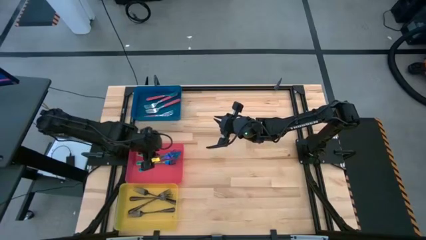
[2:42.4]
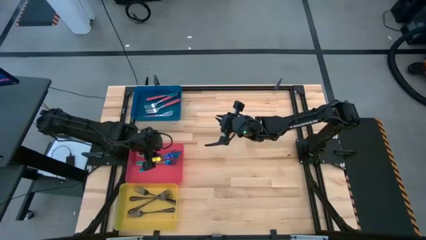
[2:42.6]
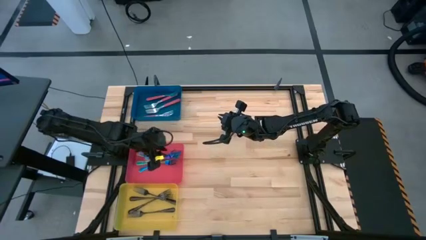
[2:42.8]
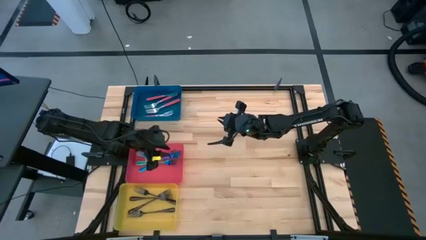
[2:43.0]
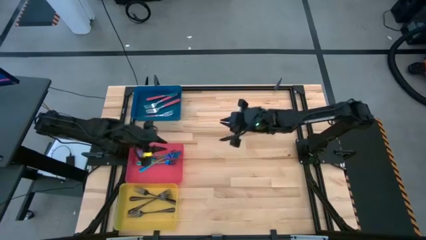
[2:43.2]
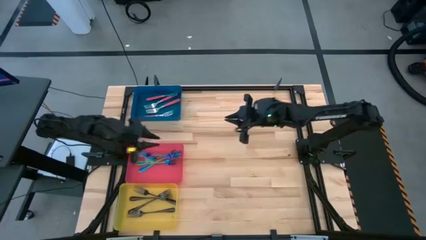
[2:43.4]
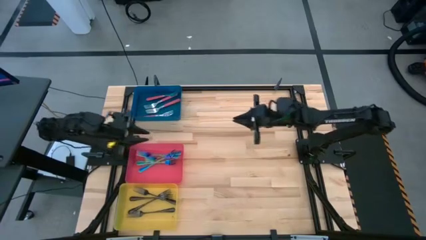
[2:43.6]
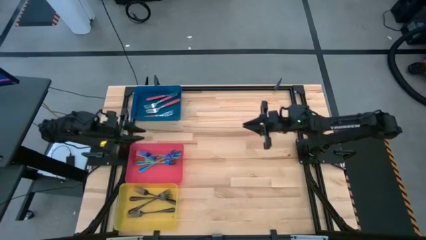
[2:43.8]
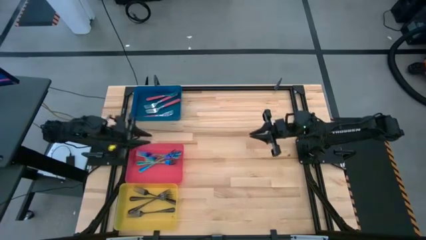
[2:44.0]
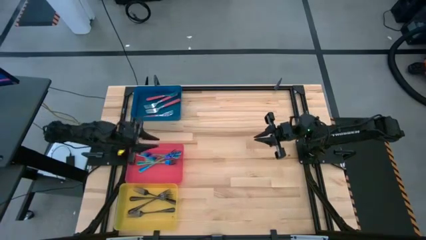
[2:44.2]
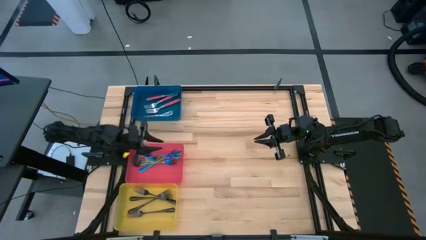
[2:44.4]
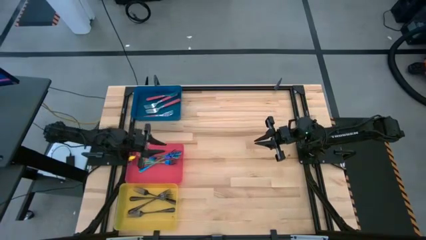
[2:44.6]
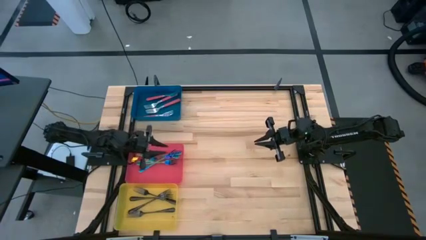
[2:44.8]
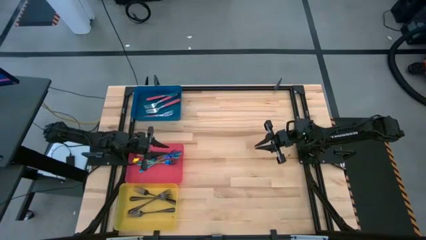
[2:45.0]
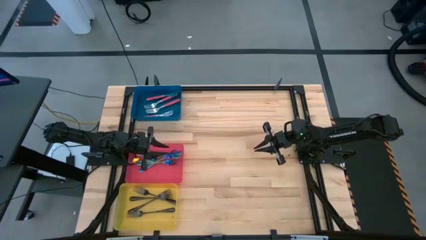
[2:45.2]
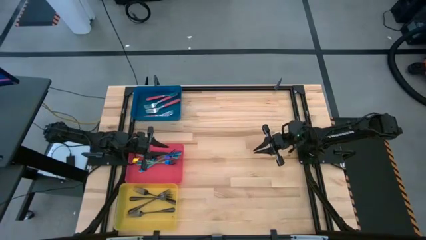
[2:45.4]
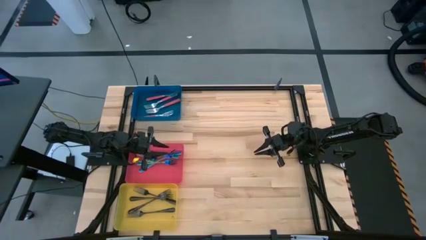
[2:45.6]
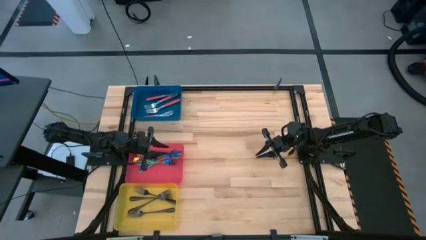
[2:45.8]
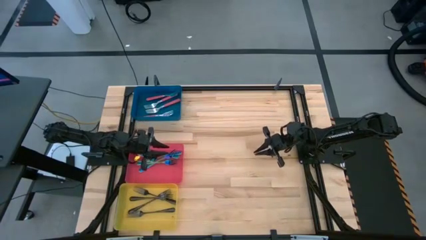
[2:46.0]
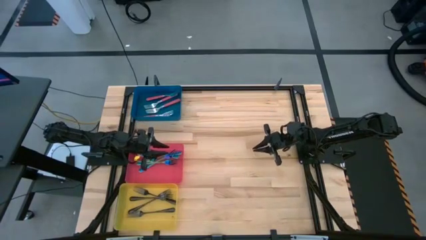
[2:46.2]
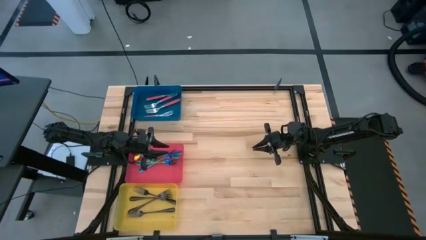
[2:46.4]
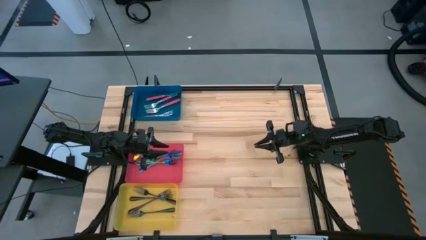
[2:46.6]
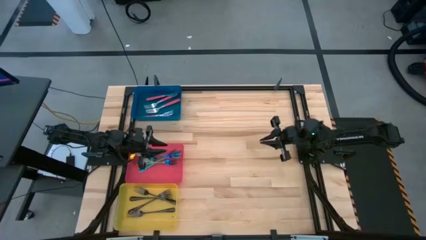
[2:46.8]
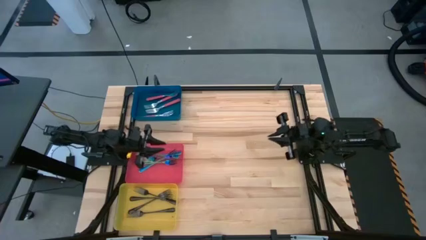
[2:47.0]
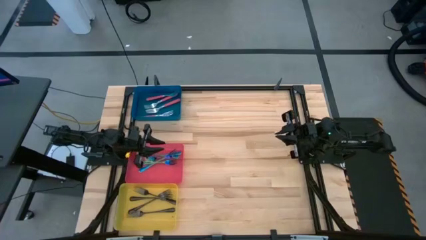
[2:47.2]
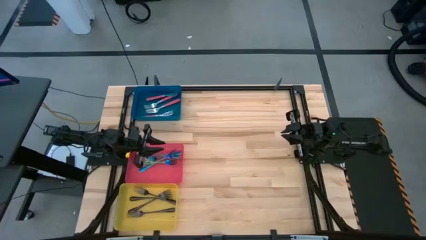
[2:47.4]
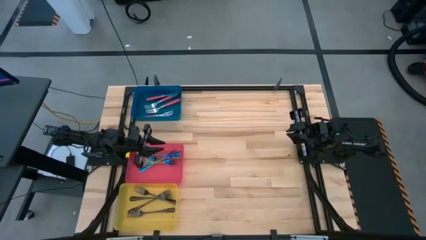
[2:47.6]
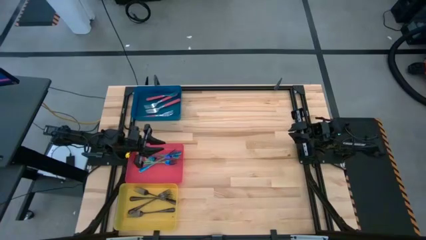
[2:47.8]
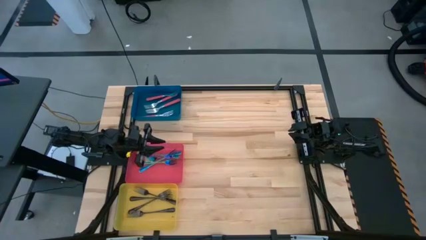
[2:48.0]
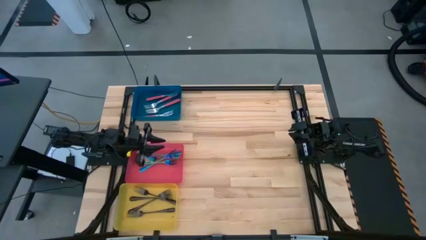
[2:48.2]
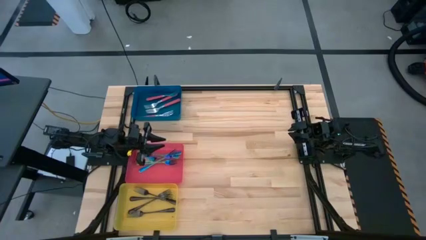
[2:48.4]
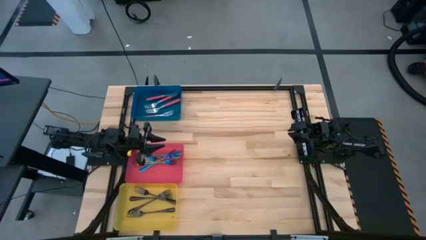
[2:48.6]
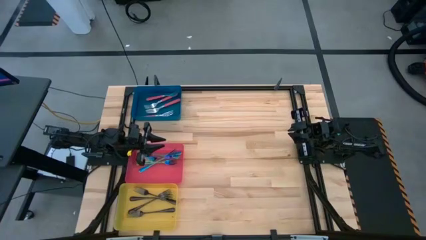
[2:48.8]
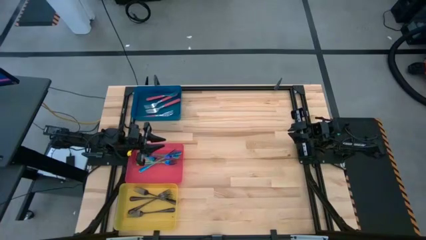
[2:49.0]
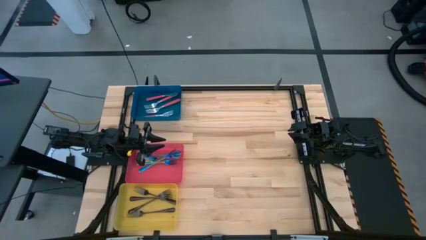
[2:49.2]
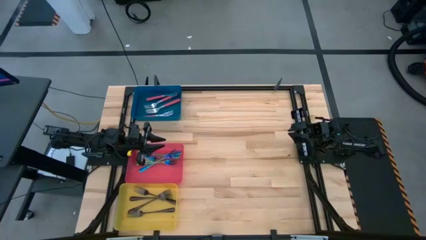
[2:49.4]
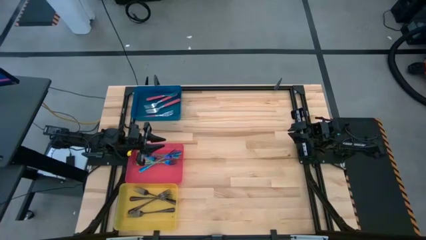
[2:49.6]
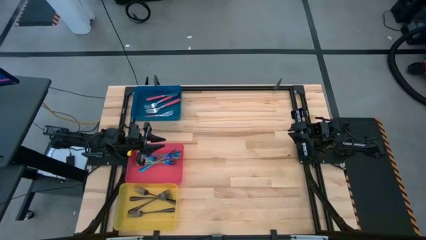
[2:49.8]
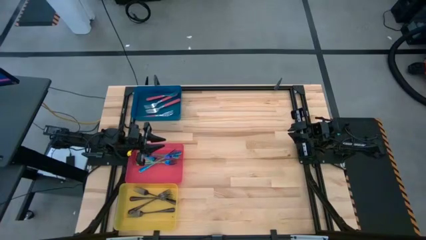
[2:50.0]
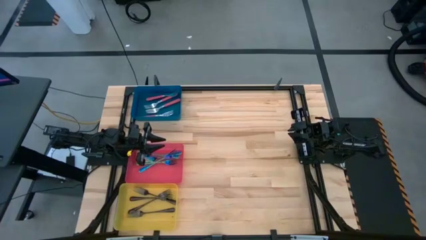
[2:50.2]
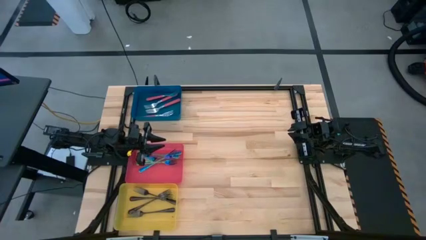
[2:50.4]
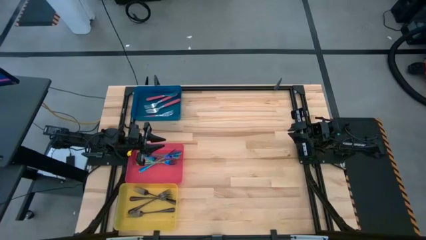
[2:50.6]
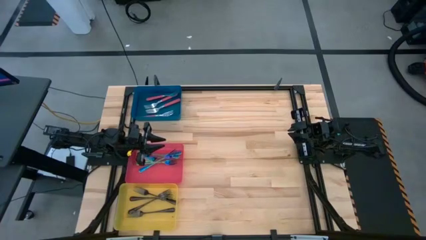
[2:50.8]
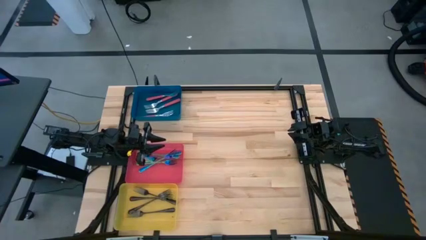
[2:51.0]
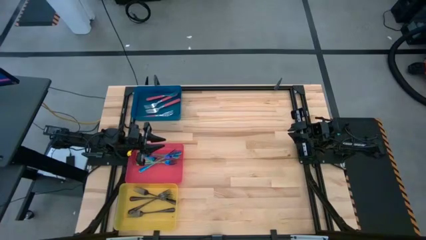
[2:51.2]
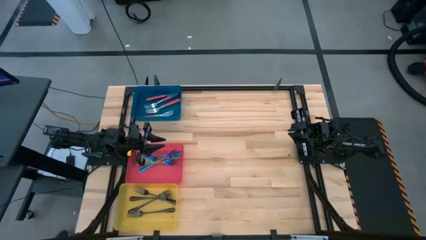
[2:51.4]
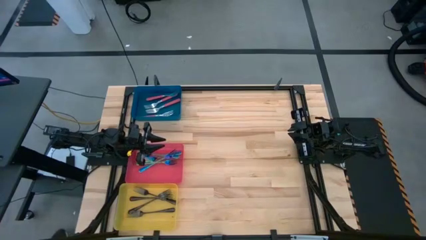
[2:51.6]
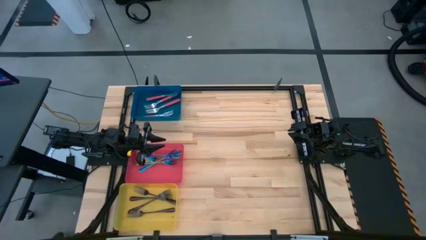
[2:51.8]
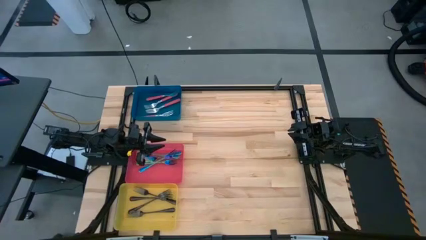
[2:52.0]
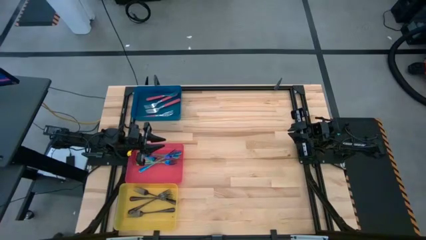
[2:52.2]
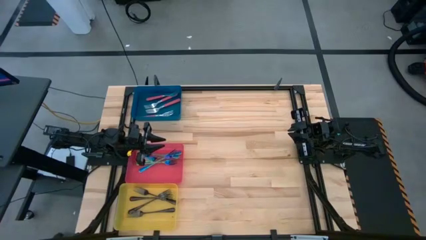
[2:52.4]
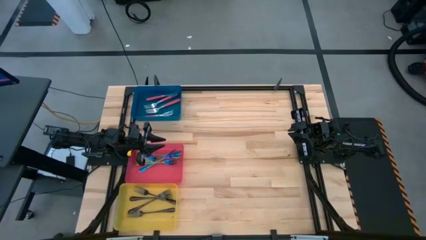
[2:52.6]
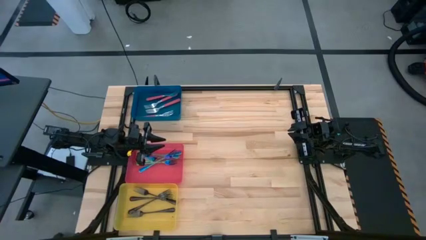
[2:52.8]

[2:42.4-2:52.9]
Task: Sort silverware by color (type)
Return to Home Position

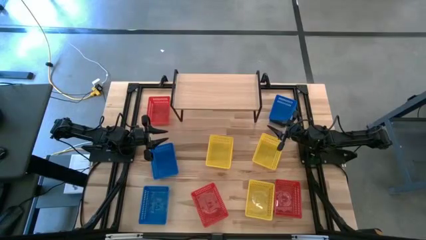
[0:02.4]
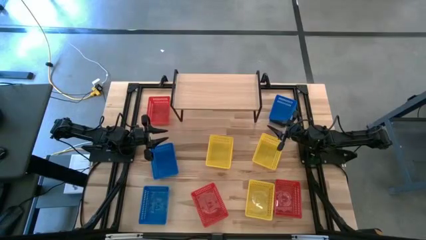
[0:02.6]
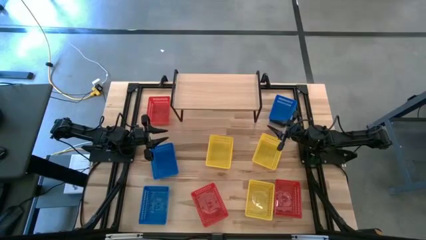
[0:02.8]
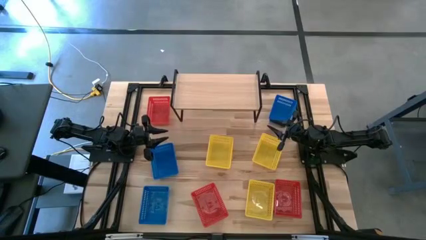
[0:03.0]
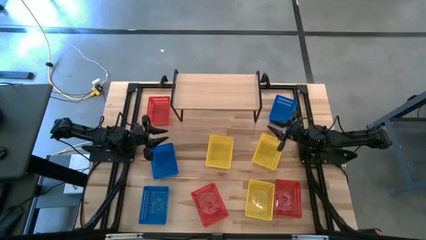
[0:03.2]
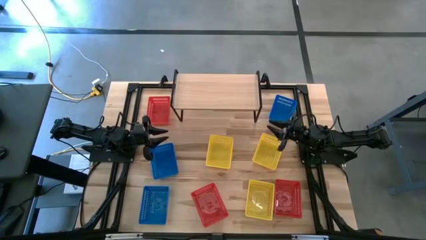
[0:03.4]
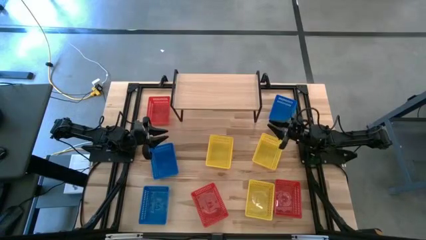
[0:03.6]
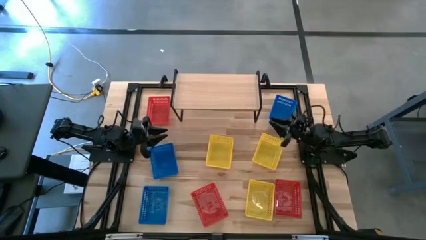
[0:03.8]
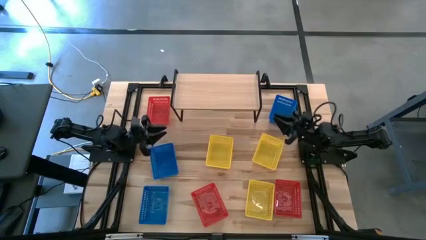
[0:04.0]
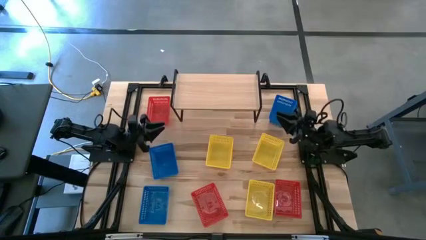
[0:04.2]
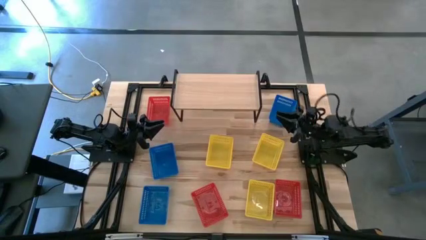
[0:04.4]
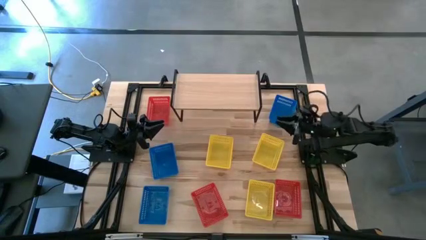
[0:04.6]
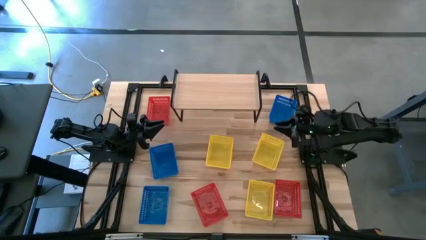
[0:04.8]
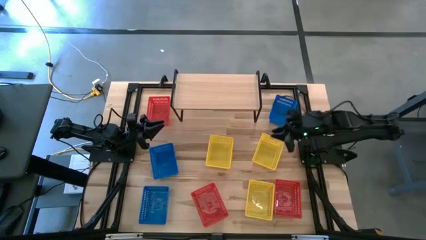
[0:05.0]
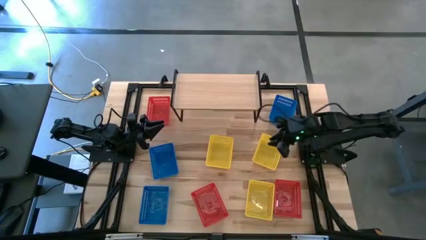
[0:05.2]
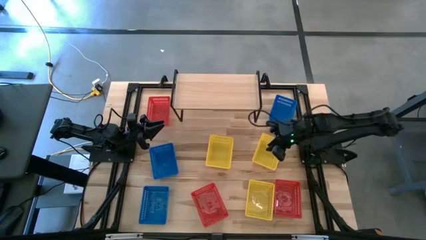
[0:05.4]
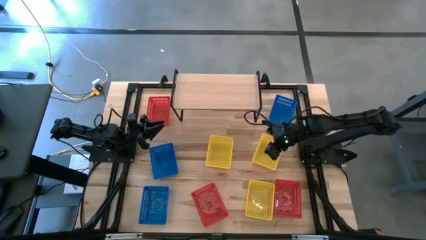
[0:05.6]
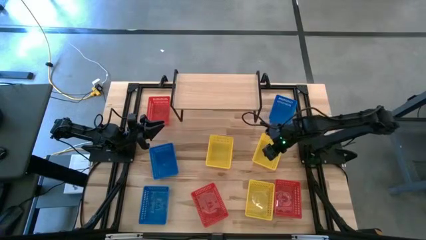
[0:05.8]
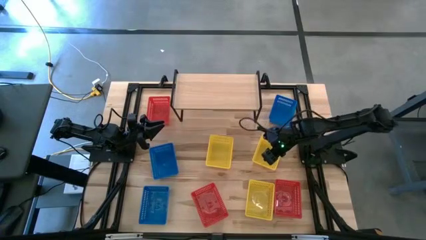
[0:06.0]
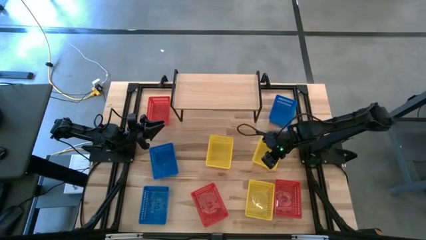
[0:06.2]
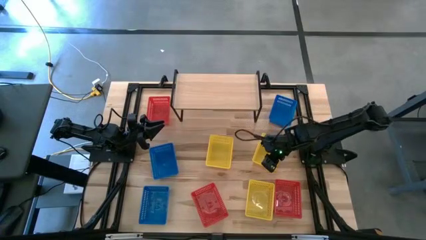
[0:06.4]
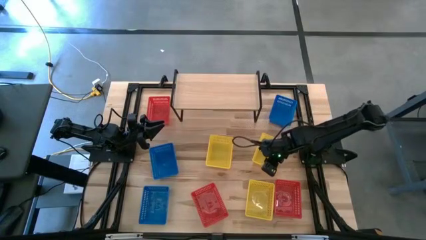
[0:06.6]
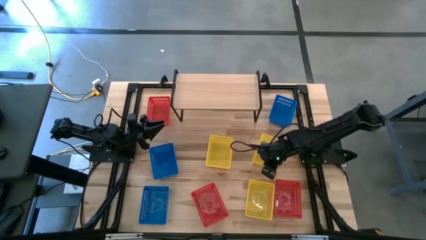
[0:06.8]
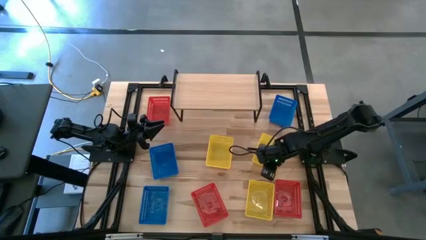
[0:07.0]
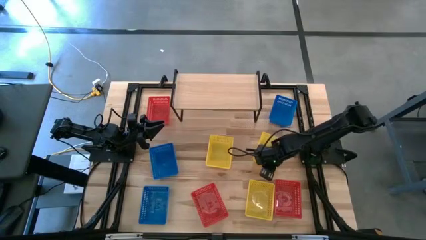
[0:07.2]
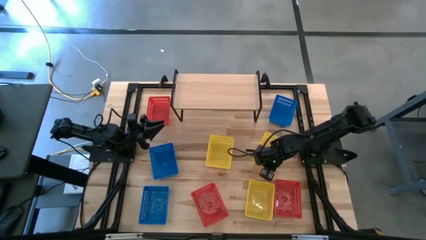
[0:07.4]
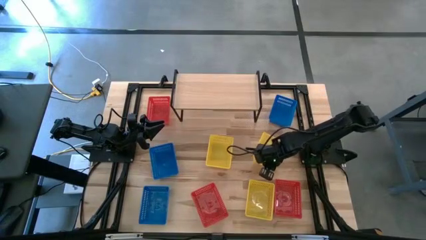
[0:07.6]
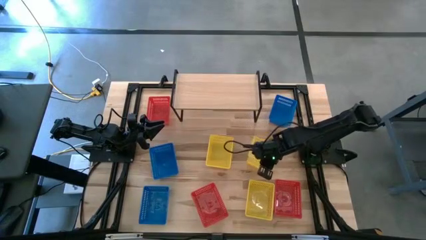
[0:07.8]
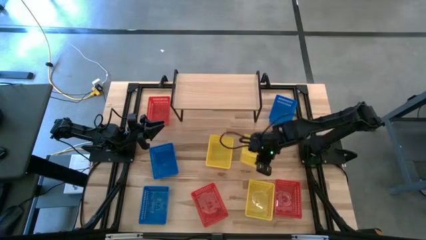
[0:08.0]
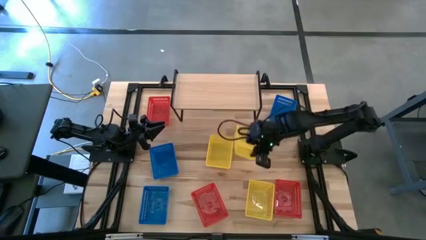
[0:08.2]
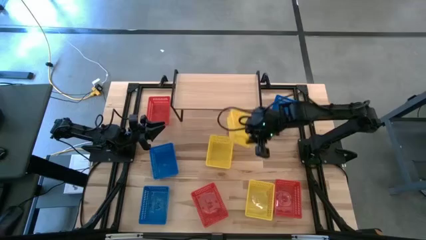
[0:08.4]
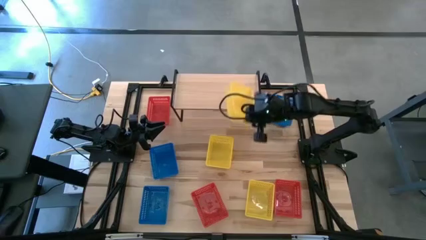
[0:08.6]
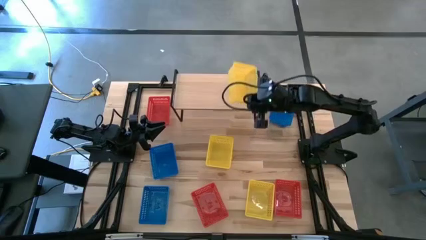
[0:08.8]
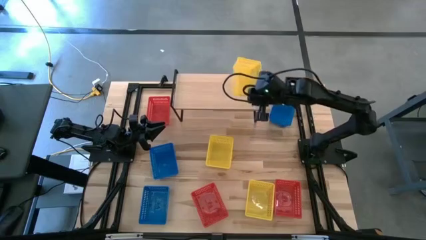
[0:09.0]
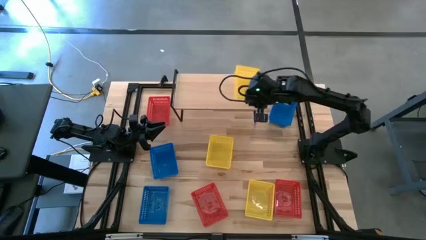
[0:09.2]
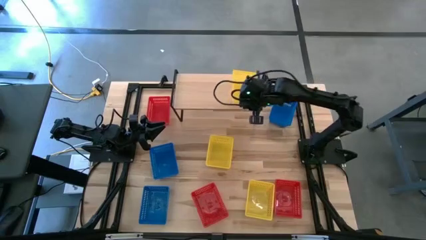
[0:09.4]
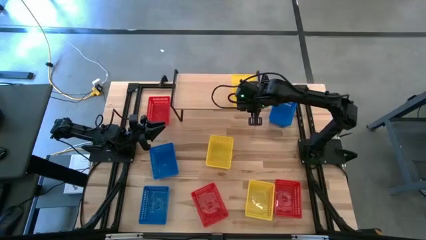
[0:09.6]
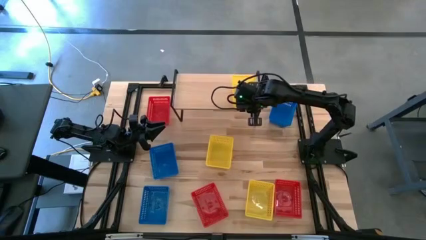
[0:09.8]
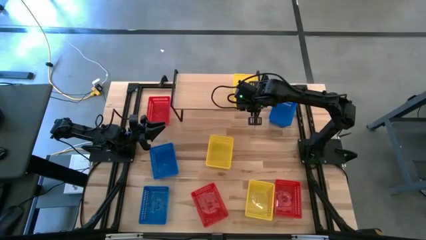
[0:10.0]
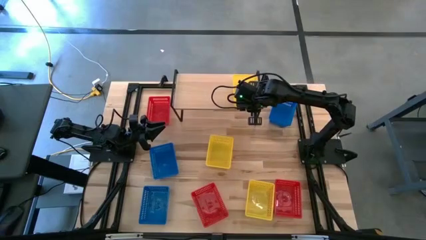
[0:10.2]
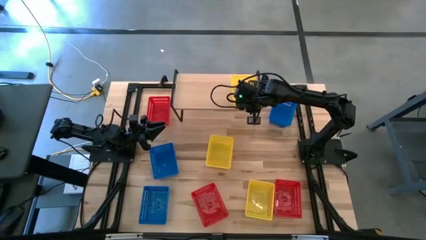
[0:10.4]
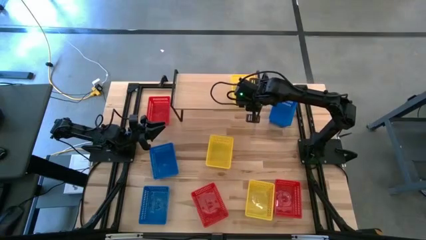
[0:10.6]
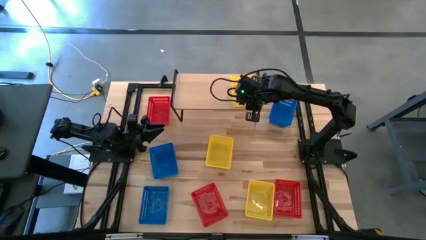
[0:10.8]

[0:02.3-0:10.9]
Task: Stack baskets on shelf by color
Put the top right yellow basket on the shelf
